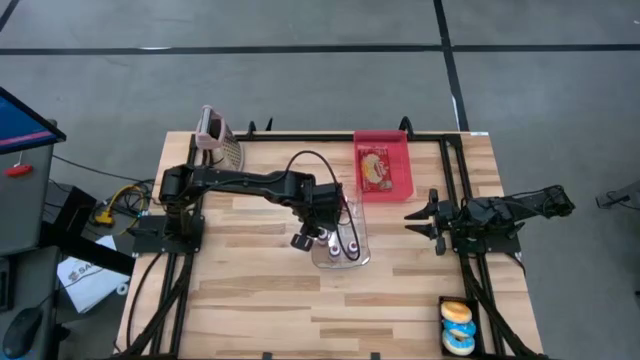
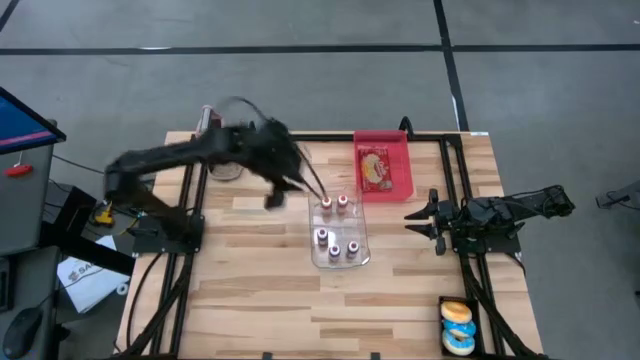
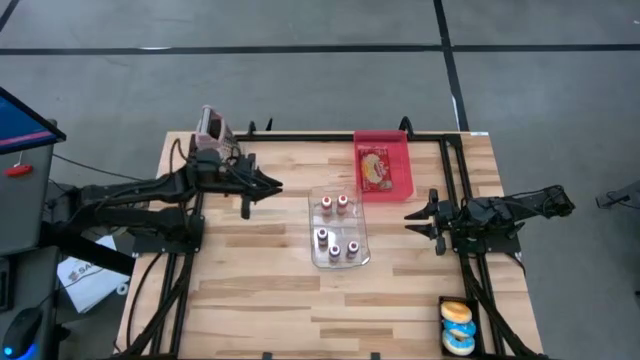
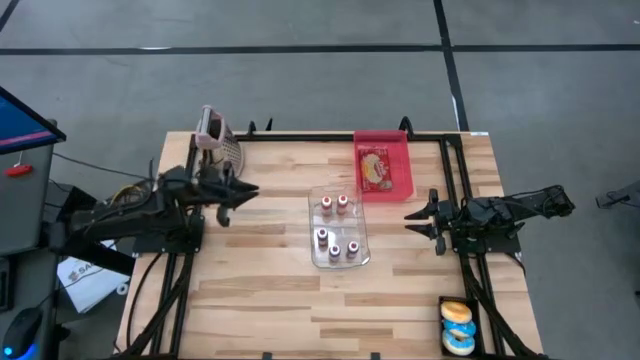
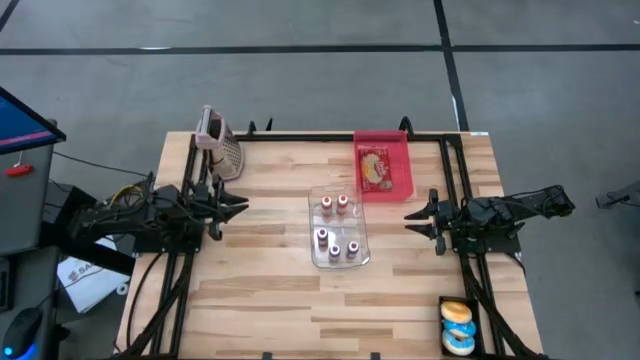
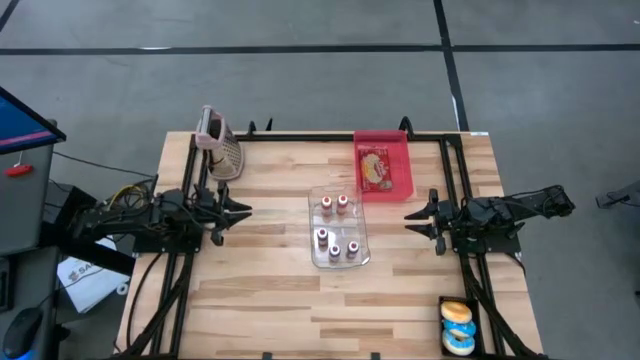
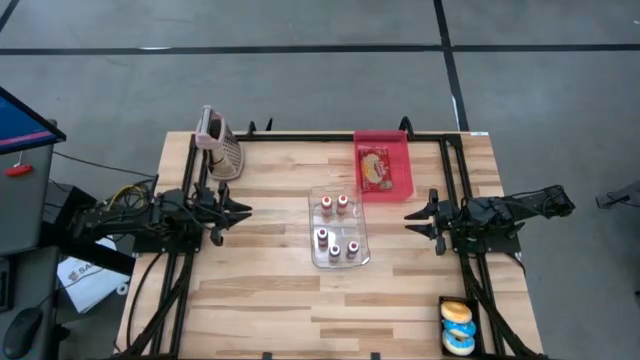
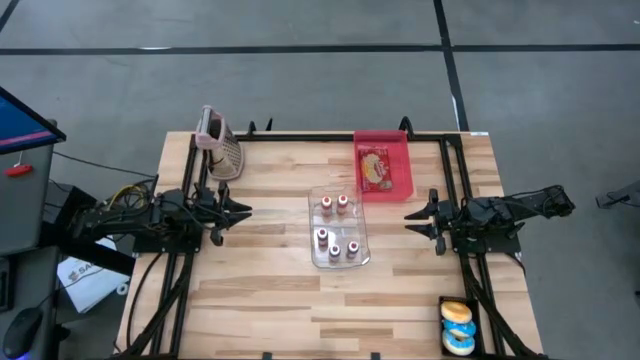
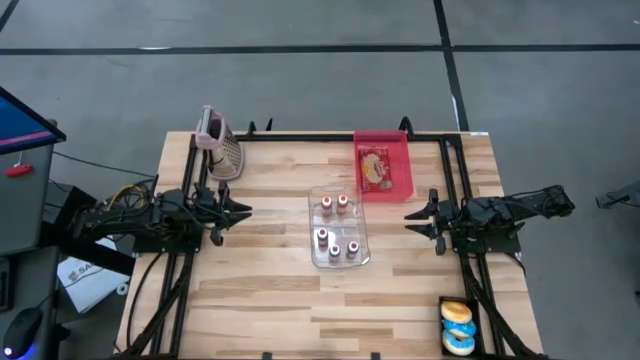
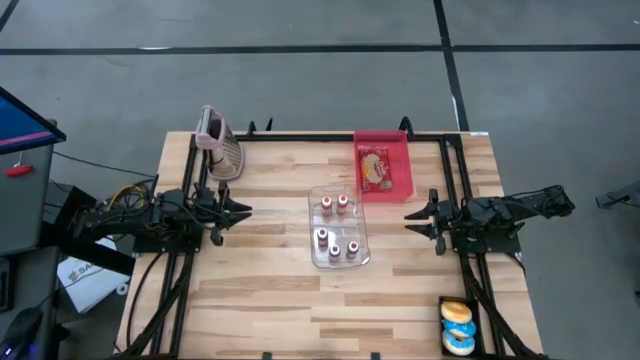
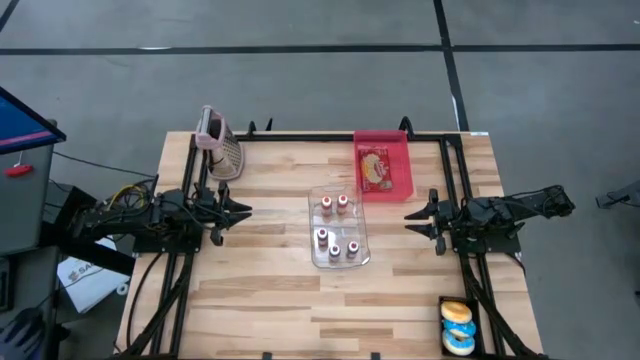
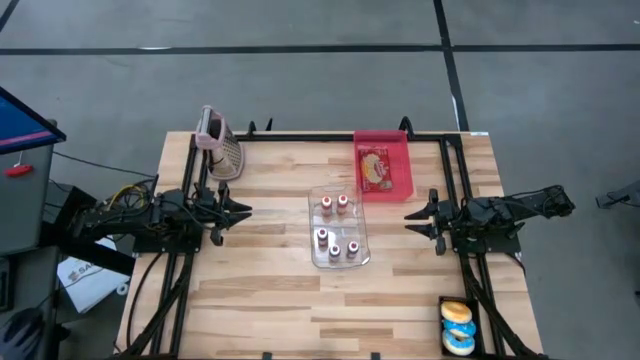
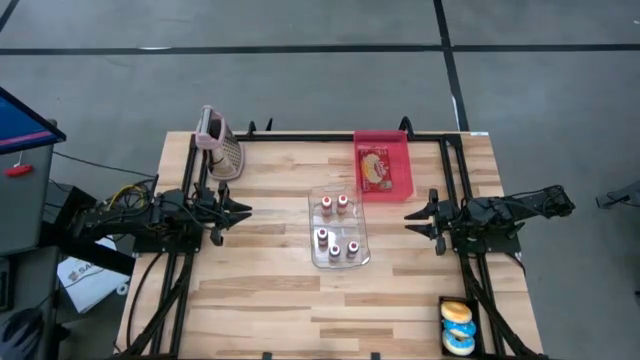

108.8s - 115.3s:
Return to Home Position
